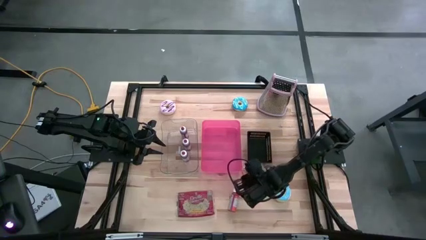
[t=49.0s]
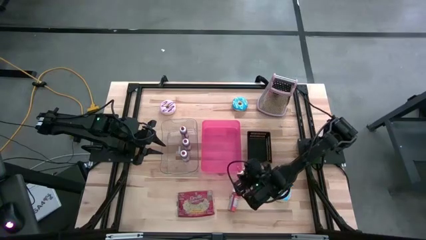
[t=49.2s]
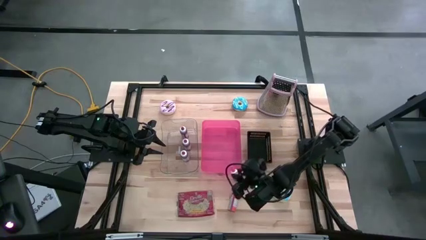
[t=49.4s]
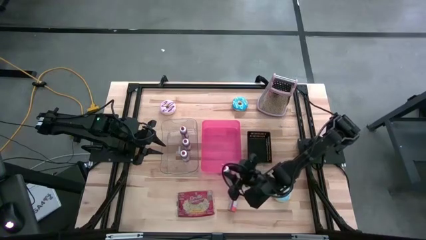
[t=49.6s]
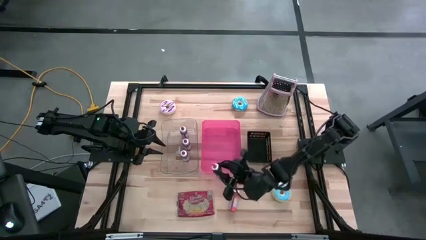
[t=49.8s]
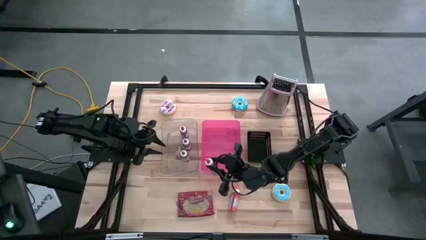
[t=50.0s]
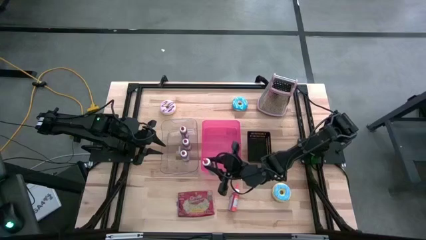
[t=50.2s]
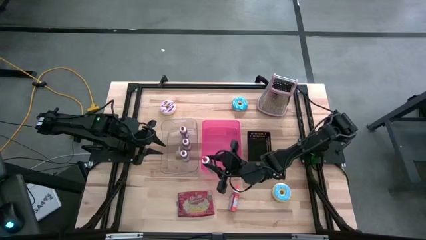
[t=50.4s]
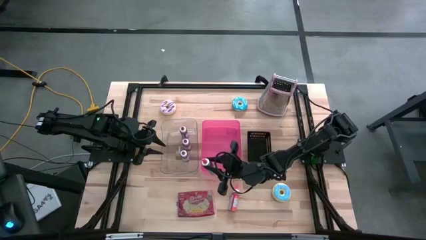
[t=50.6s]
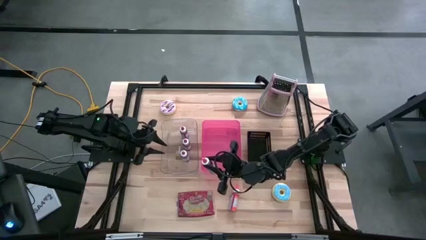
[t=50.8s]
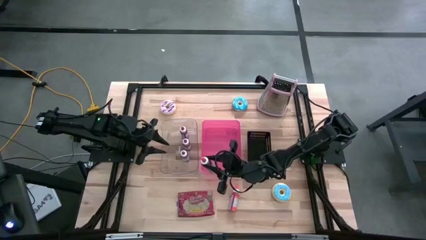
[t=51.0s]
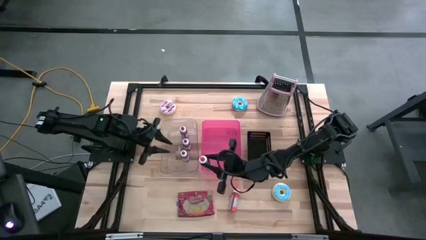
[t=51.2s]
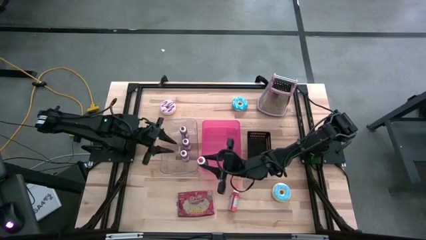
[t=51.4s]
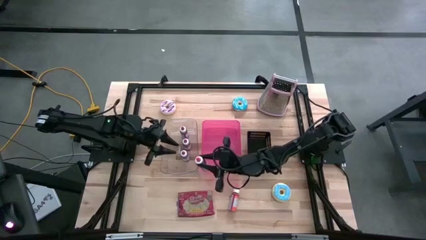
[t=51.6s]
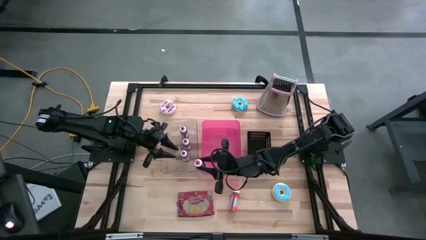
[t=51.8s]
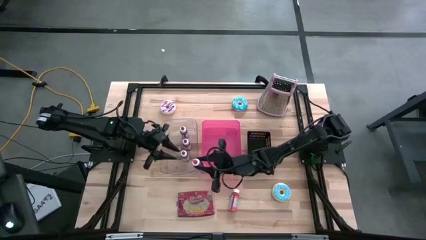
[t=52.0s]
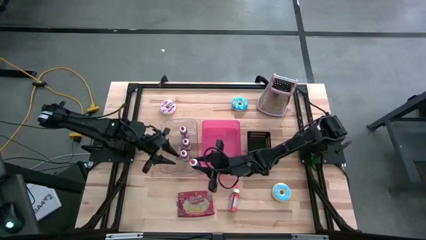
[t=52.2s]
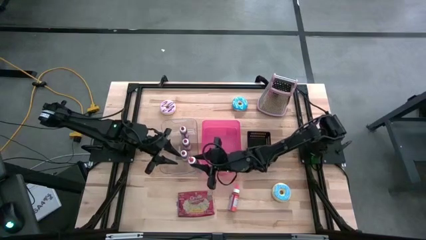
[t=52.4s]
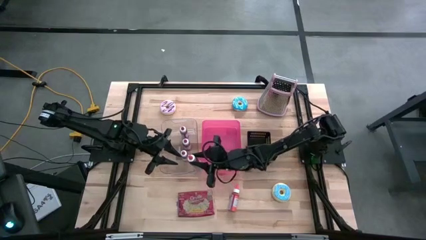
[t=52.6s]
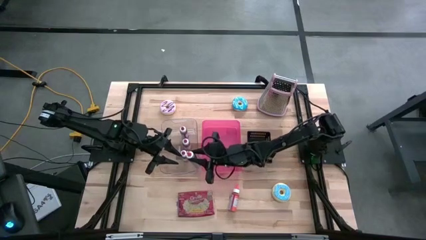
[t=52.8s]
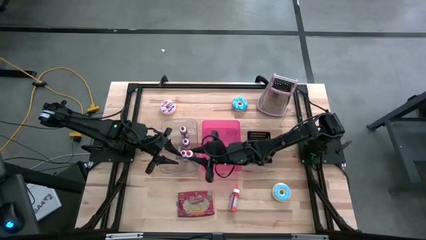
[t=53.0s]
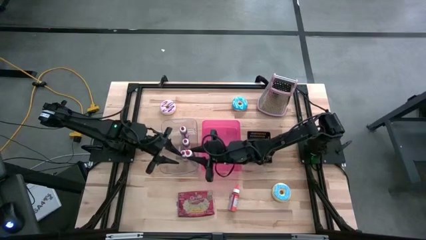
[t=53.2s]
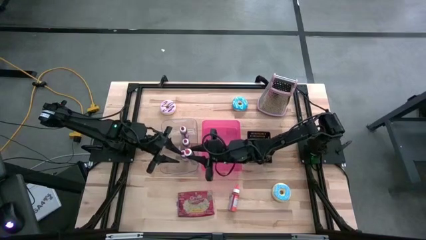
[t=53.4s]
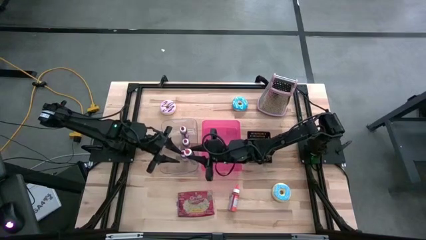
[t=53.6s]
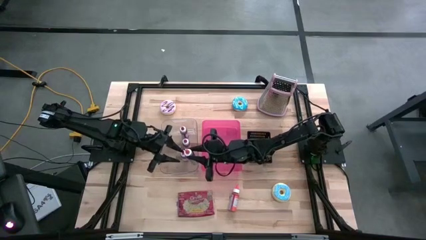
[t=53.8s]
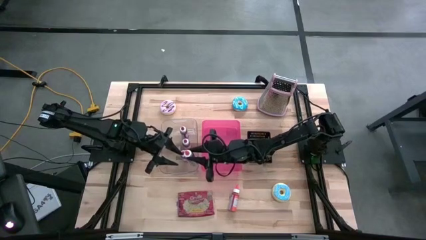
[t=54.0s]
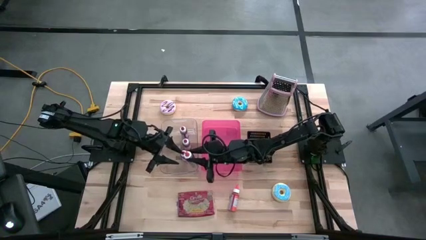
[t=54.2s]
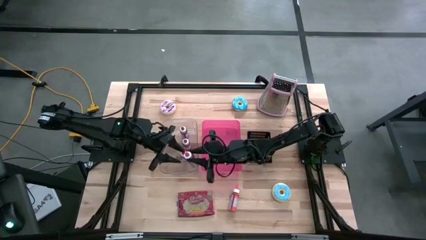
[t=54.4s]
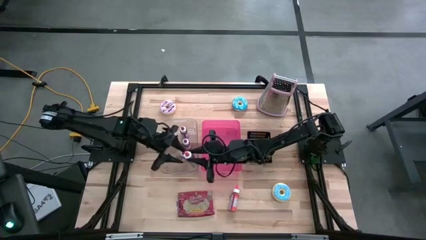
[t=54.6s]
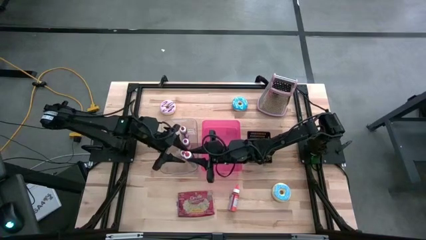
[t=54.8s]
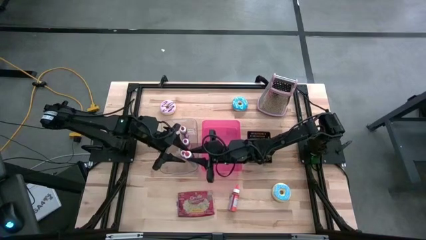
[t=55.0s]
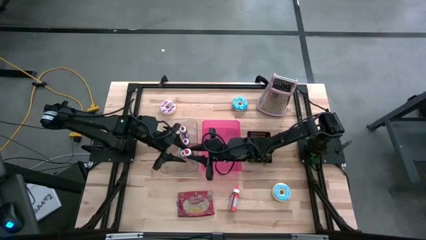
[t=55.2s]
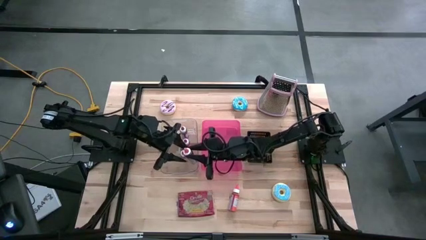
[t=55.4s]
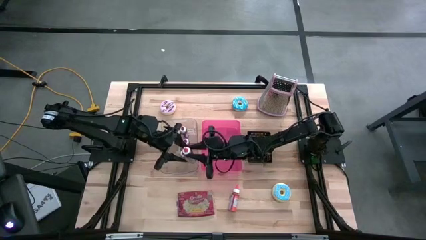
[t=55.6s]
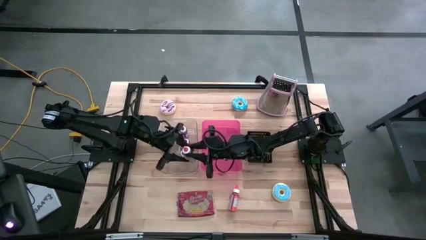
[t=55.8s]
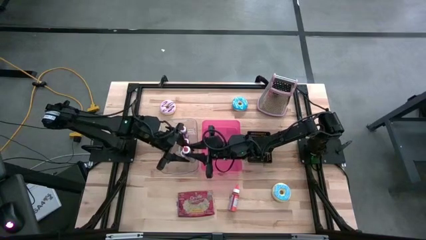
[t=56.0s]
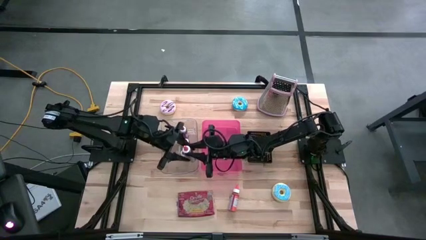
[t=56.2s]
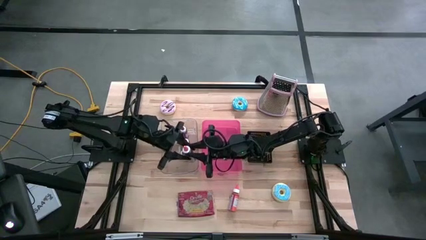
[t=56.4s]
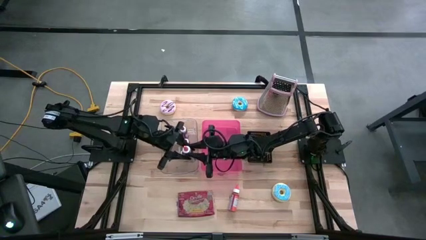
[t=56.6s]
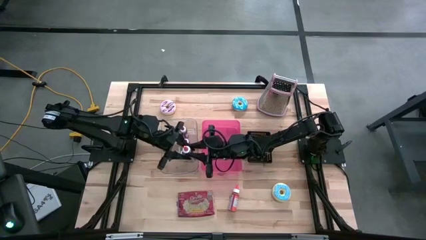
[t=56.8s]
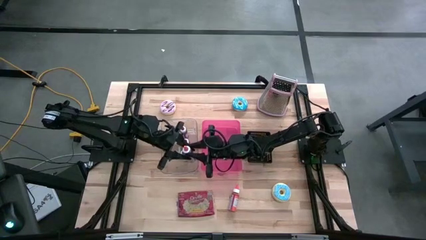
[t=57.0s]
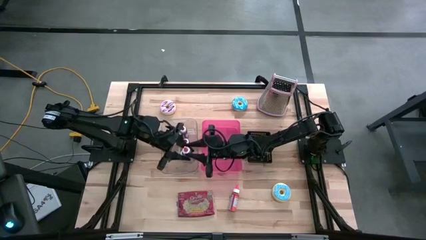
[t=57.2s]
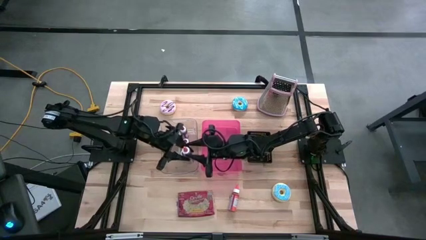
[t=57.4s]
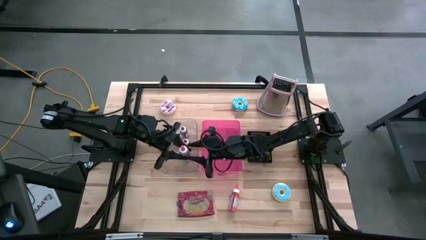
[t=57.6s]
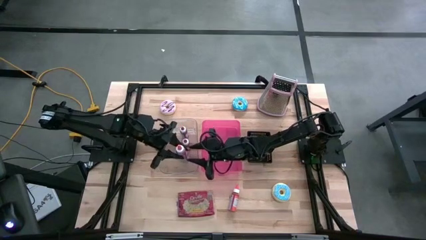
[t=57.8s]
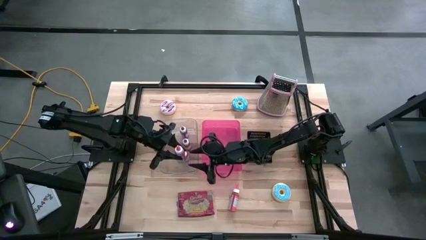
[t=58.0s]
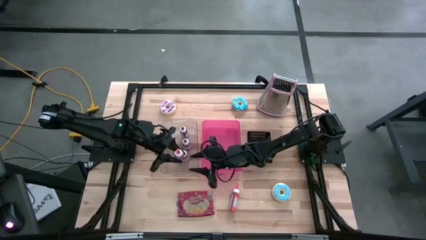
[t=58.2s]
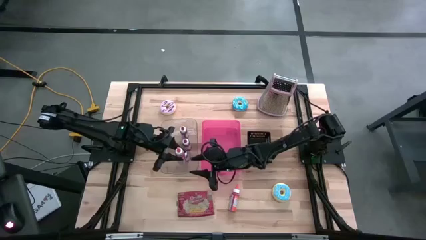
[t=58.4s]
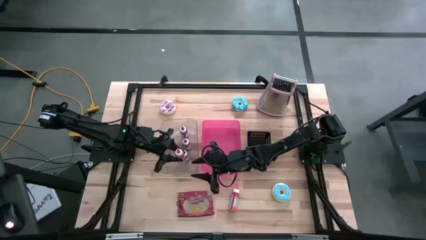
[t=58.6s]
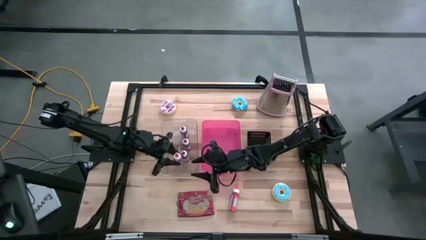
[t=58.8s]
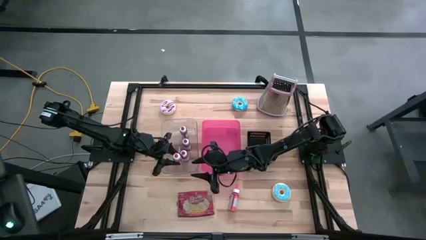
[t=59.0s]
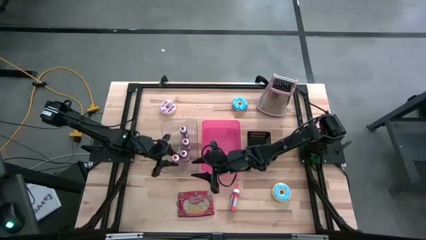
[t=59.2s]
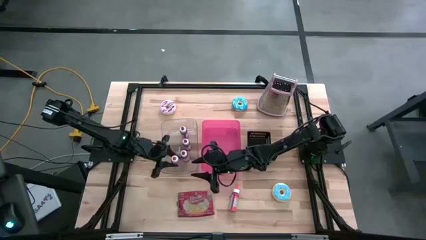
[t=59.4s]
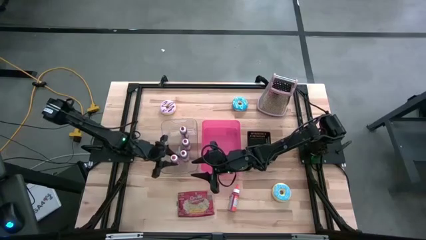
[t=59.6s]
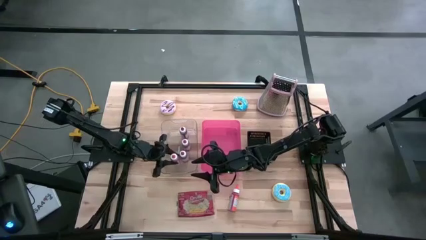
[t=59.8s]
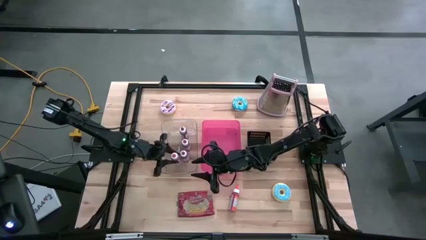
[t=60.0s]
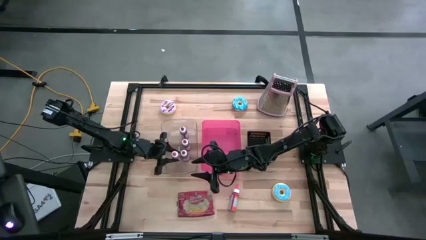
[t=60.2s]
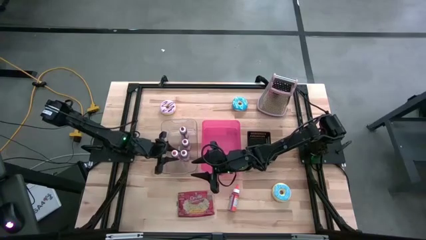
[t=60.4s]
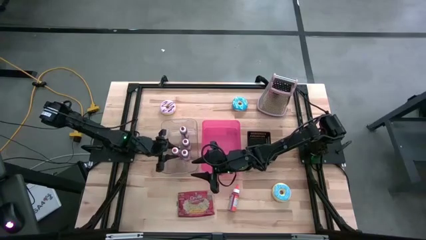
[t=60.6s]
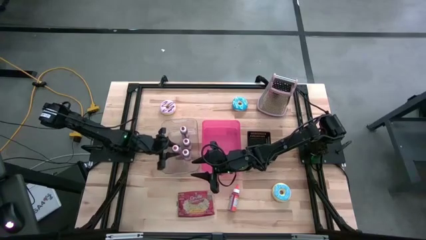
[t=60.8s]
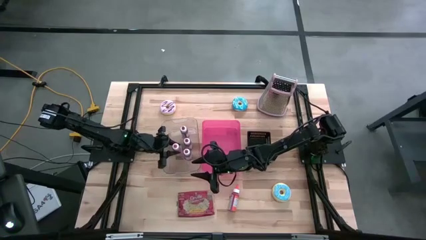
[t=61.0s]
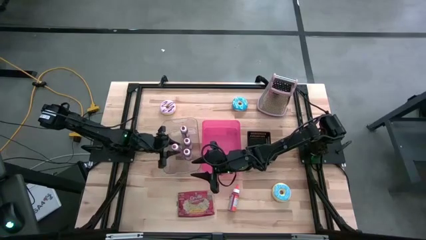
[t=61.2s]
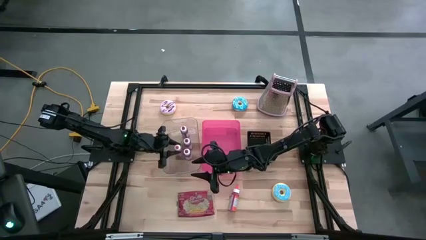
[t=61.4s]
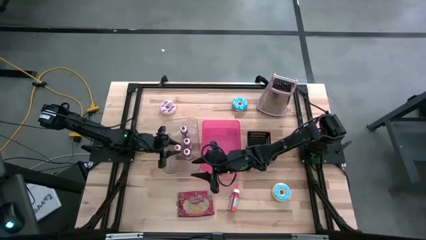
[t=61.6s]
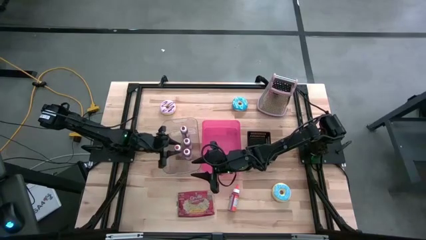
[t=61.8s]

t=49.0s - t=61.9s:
Task: Pick & Place Food Item
Put the right orange food coloring bottle into the transparent bin
